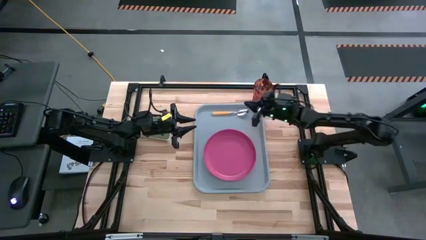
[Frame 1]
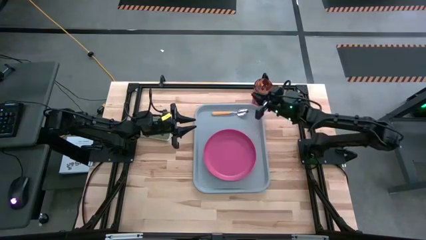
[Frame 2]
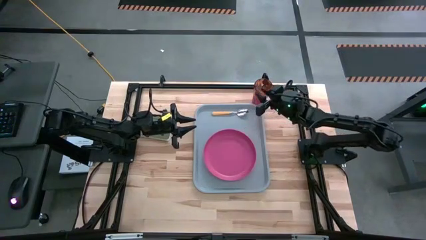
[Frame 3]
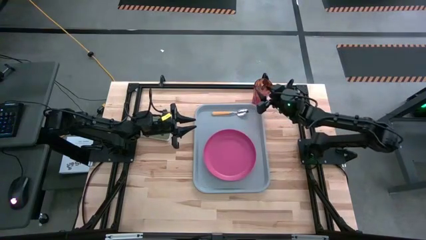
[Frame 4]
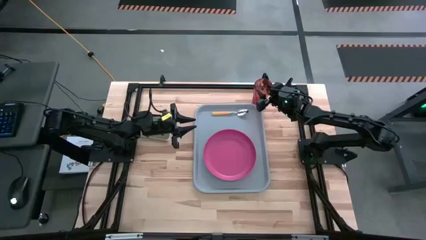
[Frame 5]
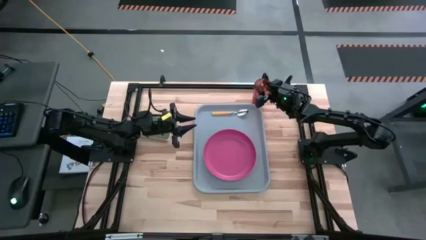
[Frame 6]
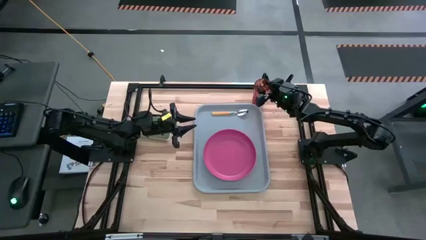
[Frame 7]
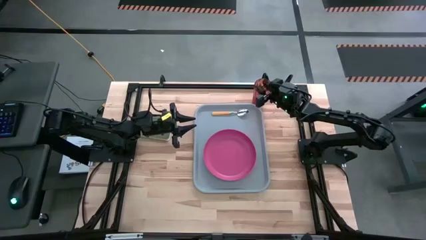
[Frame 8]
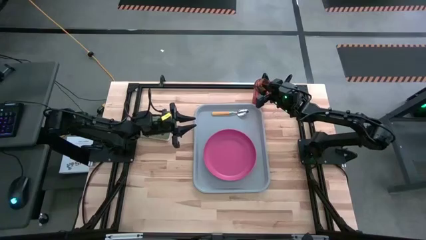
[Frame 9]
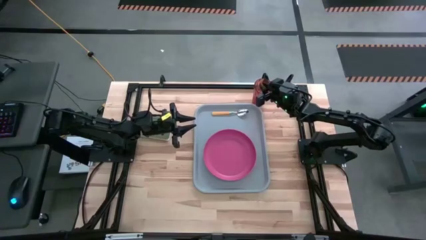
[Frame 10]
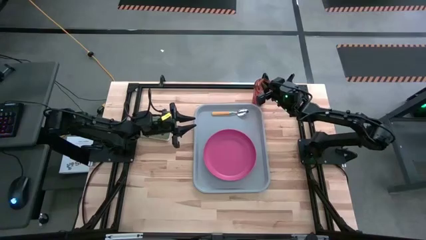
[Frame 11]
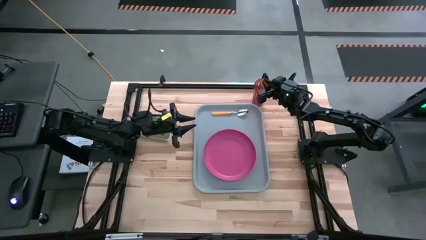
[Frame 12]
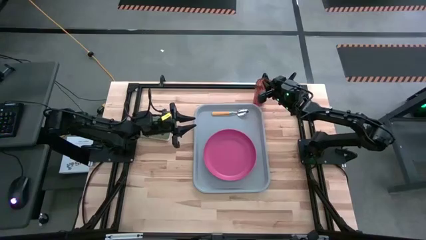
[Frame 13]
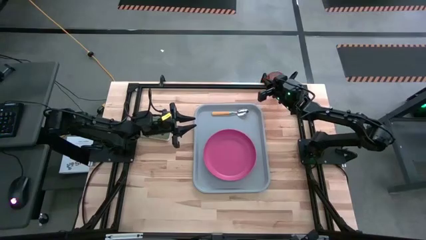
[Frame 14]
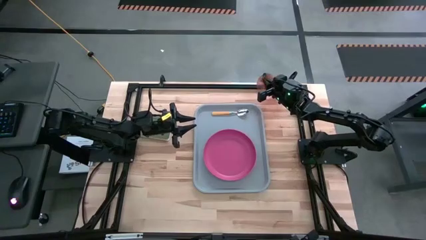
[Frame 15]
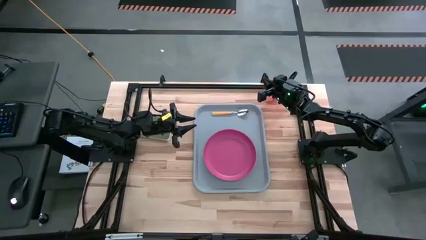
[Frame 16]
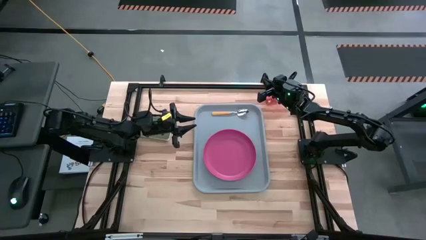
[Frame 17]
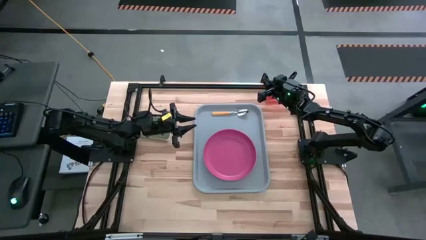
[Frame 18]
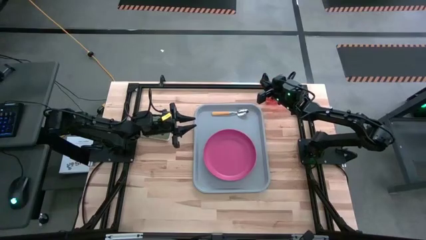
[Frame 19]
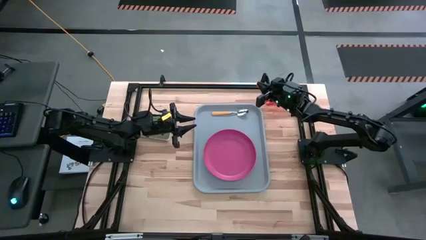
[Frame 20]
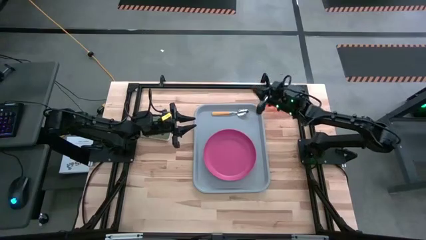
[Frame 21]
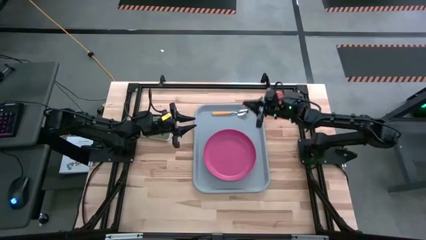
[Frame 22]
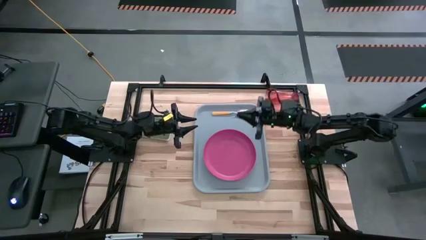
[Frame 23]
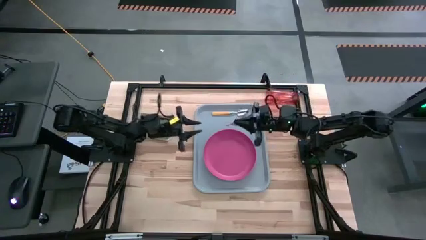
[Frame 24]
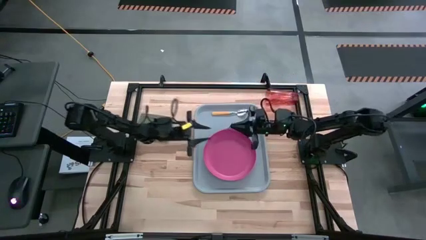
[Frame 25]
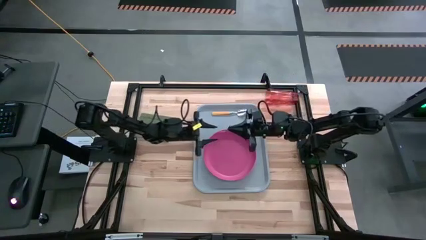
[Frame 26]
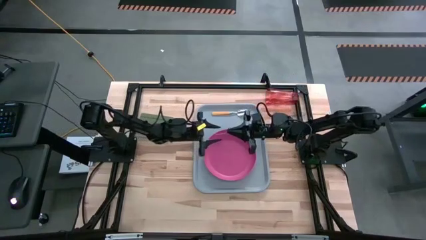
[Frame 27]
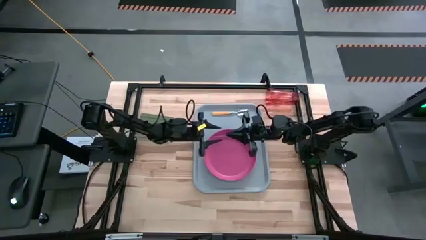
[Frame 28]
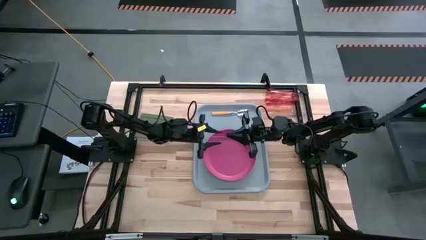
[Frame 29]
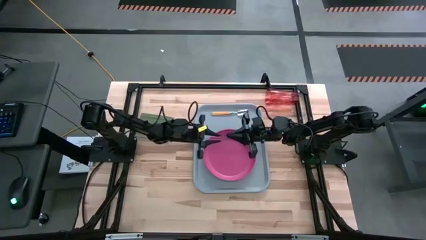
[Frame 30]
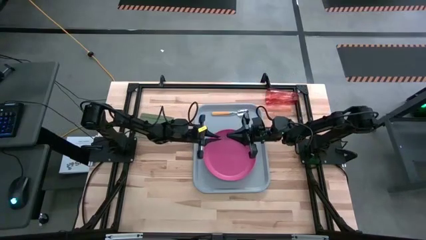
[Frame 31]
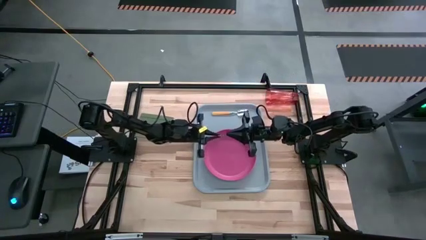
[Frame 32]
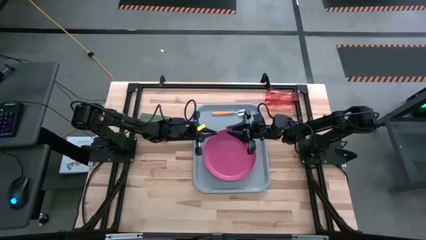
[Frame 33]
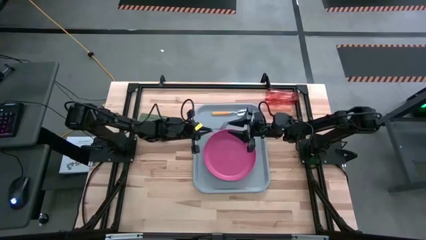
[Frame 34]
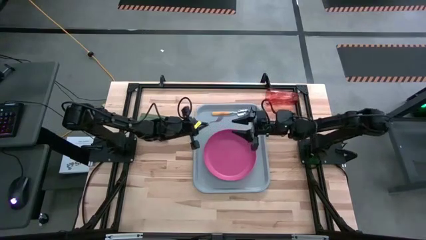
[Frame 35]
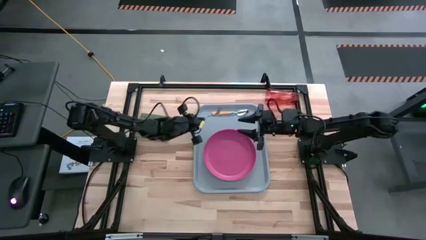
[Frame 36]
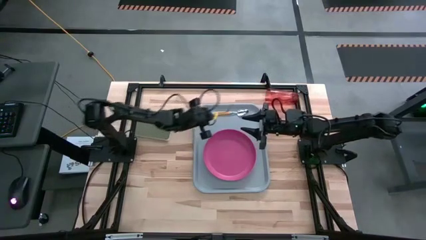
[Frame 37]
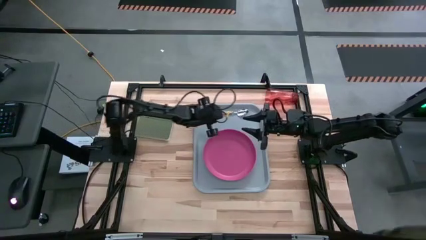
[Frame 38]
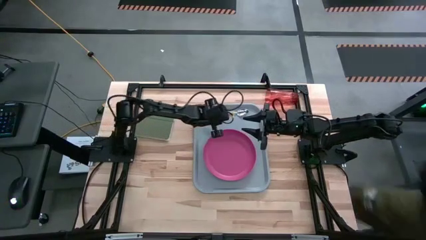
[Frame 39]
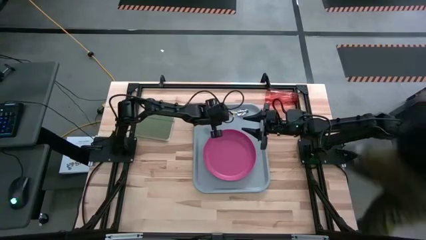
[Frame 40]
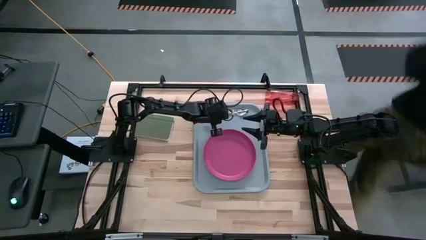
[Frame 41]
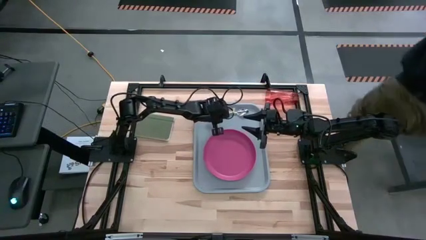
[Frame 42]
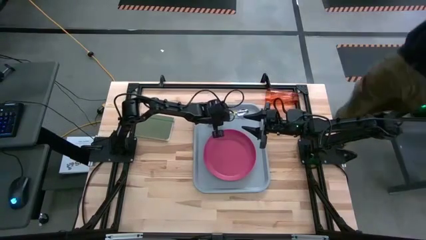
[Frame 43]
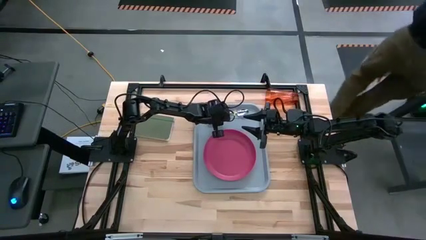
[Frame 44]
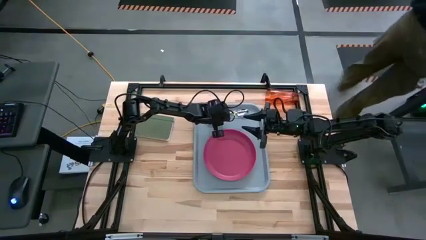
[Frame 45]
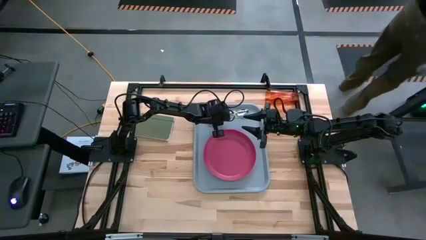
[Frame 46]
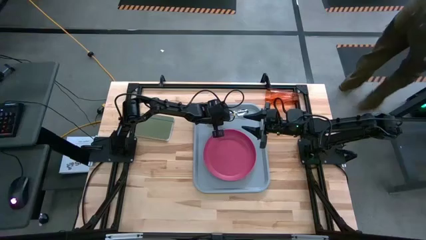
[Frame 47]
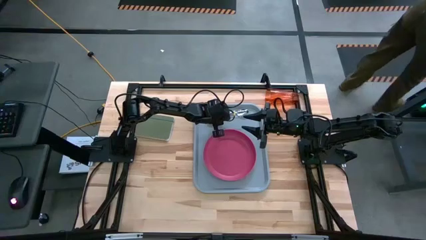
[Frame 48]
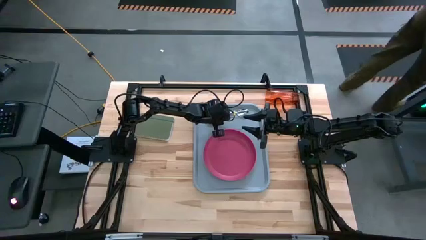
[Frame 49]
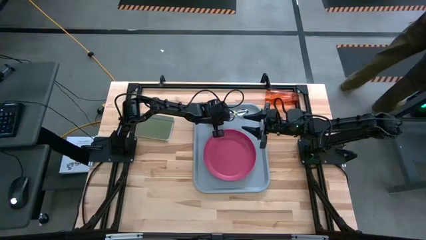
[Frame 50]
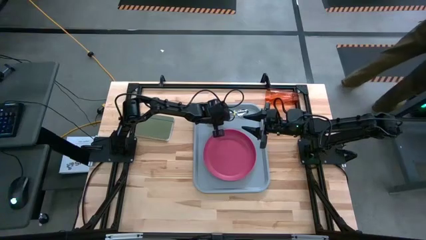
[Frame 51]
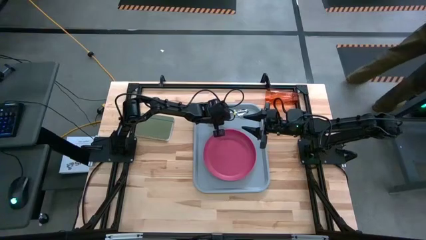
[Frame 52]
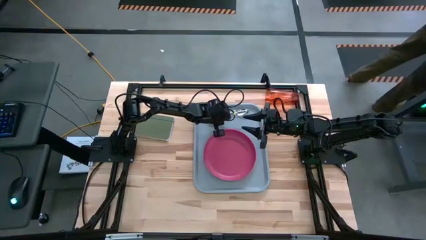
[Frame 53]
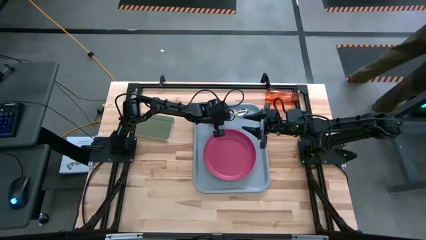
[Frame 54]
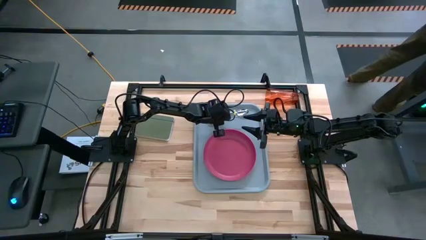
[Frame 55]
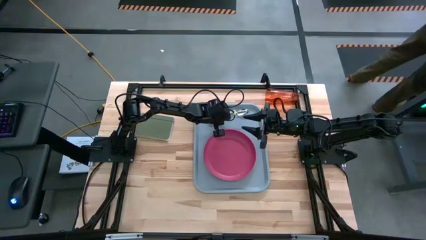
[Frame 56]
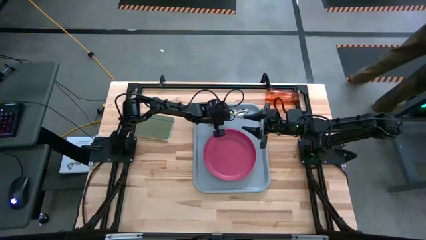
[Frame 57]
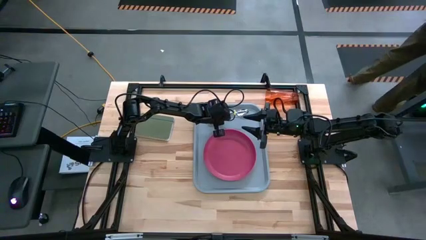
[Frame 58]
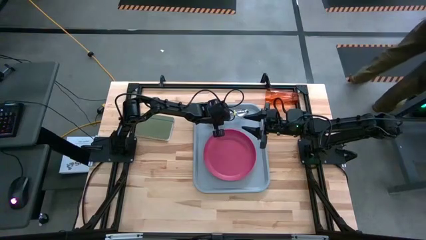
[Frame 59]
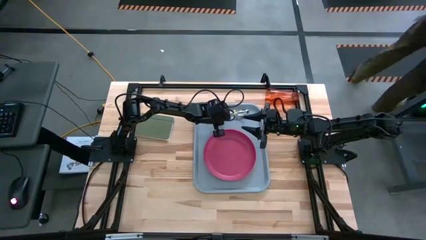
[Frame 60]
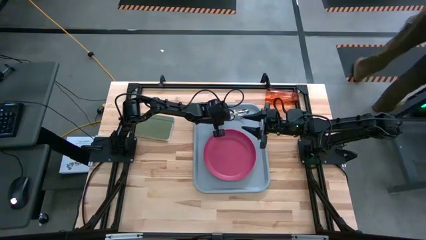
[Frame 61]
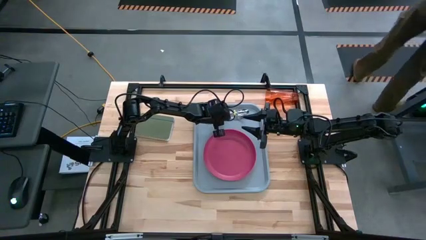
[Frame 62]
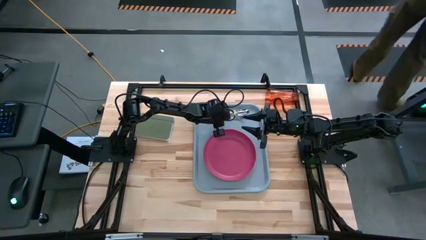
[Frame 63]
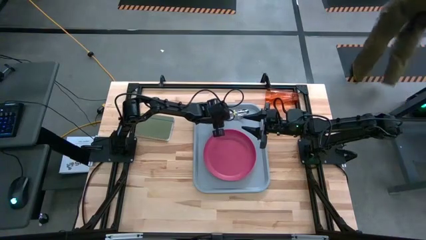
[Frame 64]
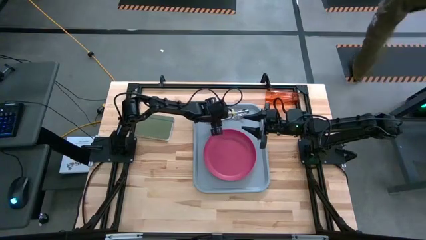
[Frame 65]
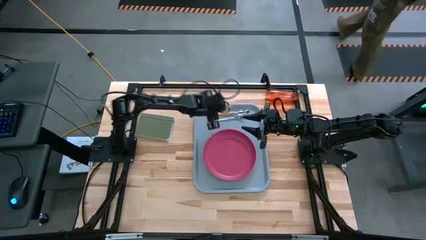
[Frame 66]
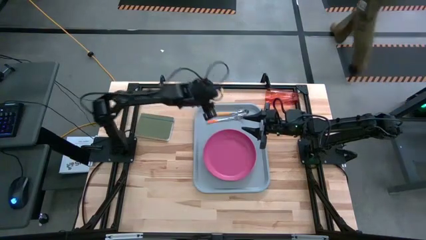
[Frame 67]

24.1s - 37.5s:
Task: Pick and place plate/cup/fork/spoon on tray
Put the fork on the tray at the top of the plate

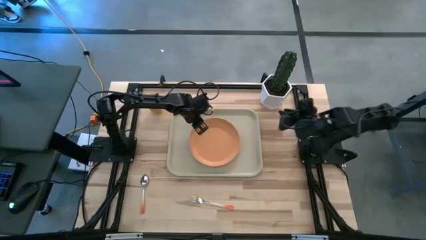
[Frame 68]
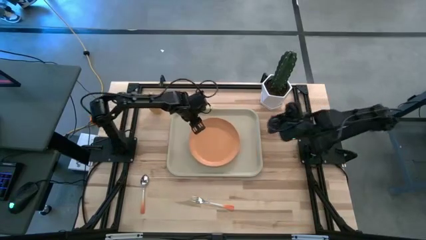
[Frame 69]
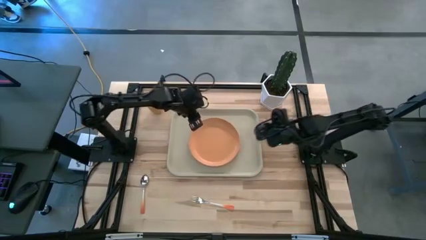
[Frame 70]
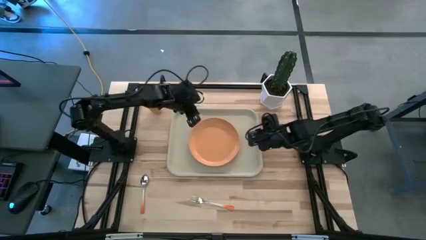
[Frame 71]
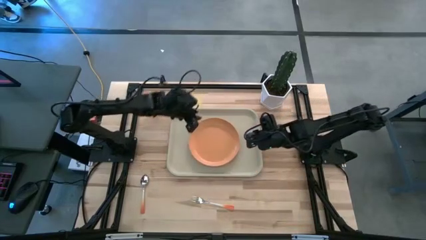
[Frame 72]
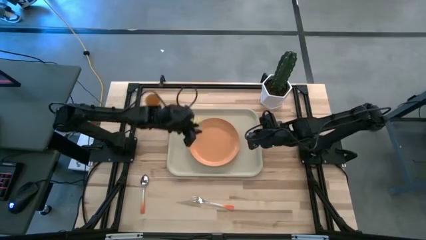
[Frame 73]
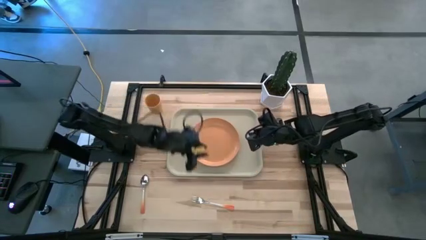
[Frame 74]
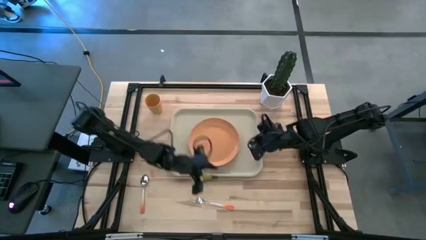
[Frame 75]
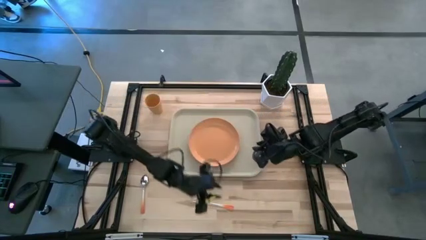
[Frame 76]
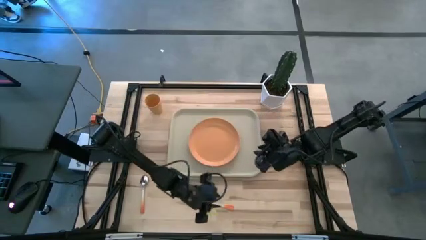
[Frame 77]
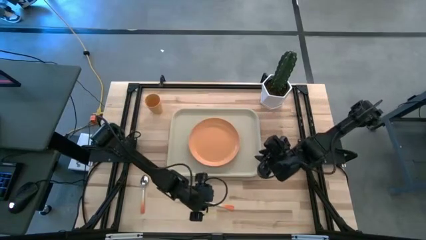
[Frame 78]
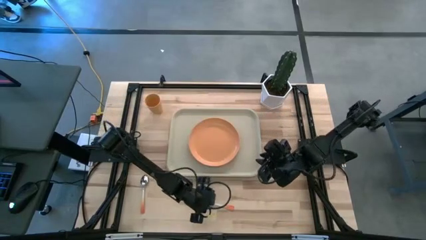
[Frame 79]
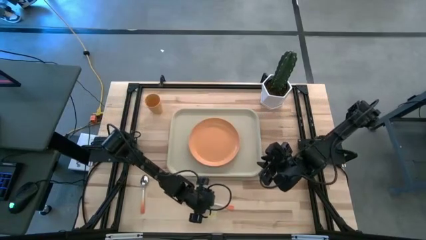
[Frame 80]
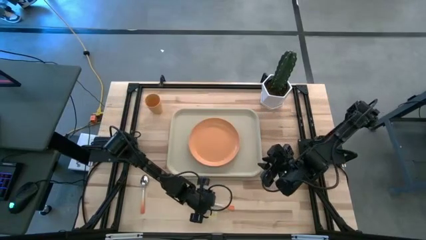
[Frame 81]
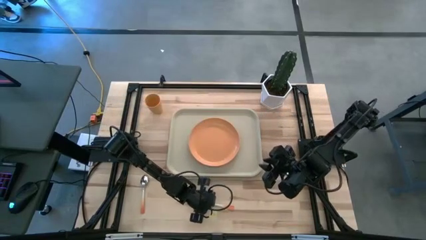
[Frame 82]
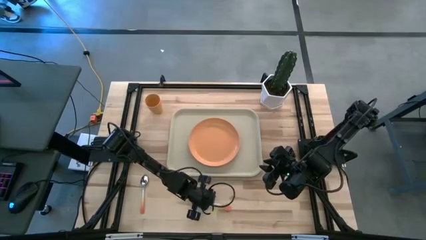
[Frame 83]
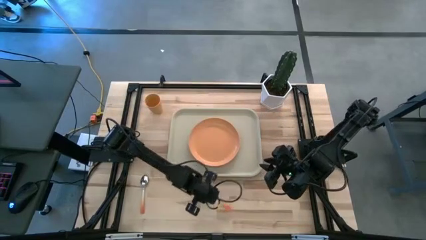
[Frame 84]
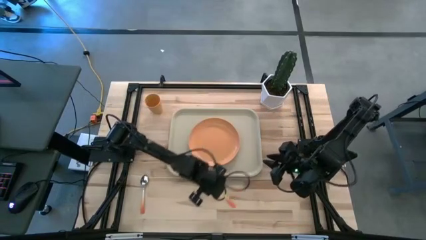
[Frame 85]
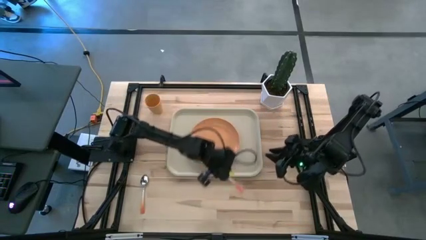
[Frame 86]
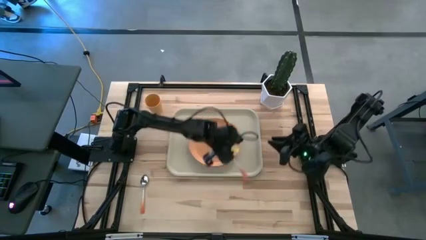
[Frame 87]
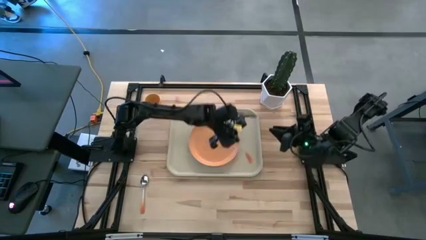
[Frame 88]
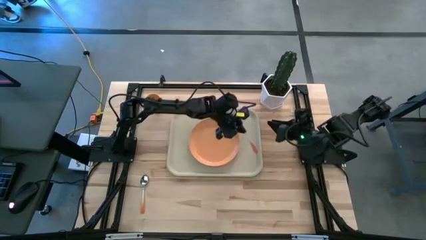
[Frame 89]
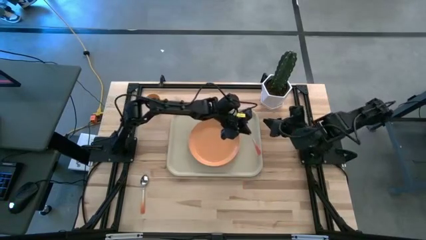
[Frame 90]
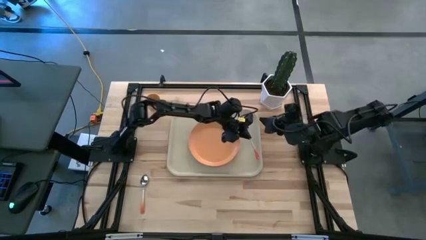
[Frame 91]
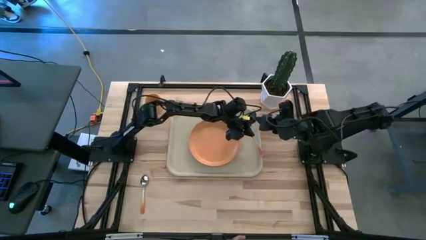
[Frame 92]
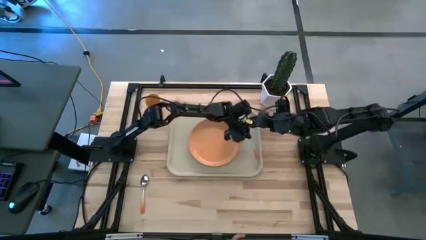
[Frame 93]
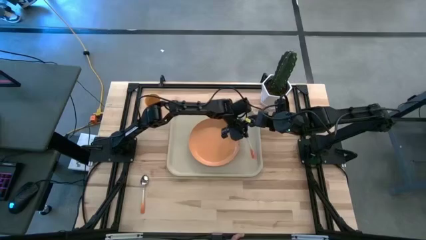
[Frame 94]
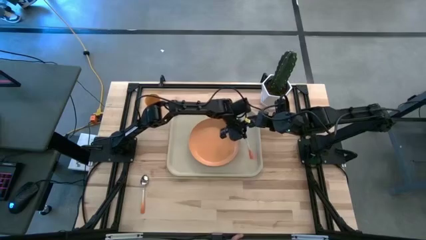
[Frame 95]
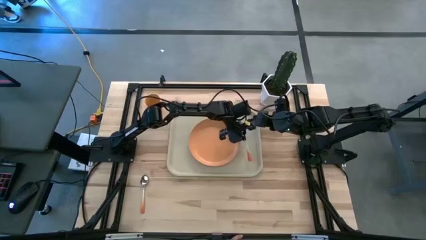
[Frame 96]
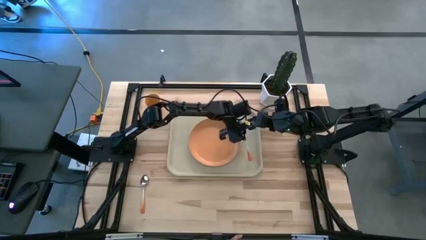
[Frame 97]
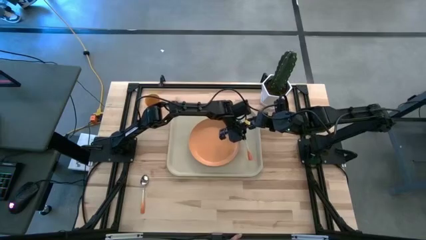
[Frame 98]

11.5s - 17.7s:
Task: Pick and place plate/cup/fork/spoon on tray
Put the orange fork on the white tray to the right of the light orange plate
